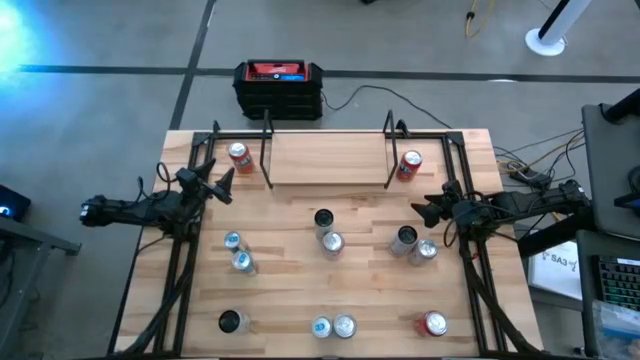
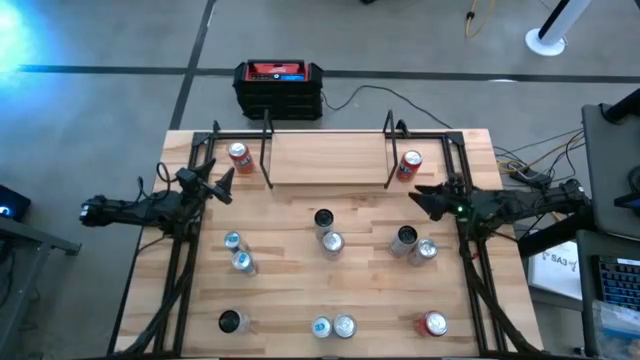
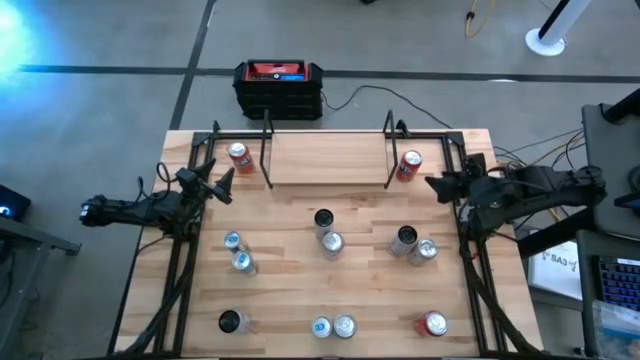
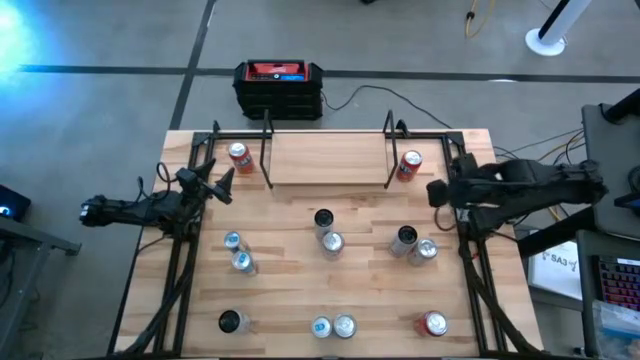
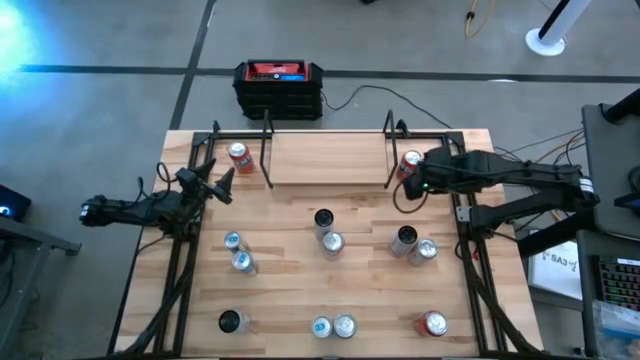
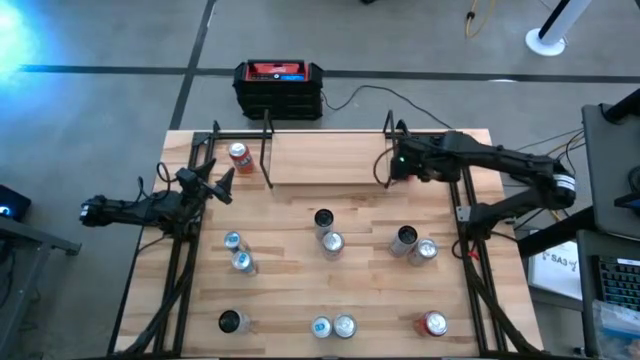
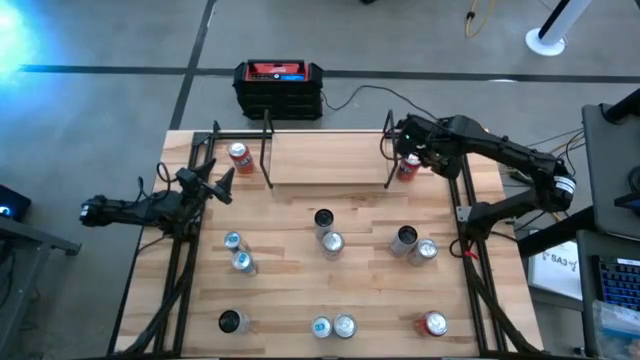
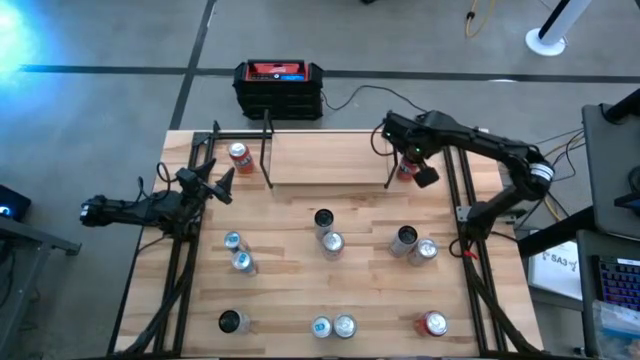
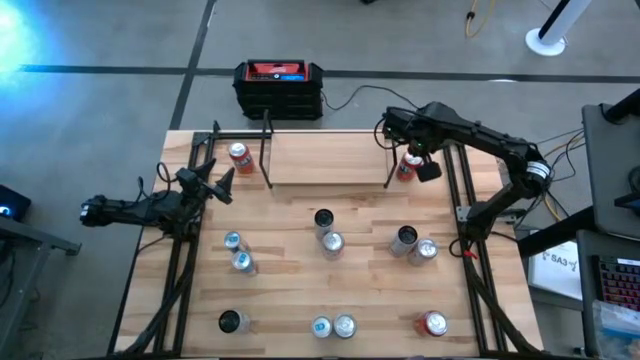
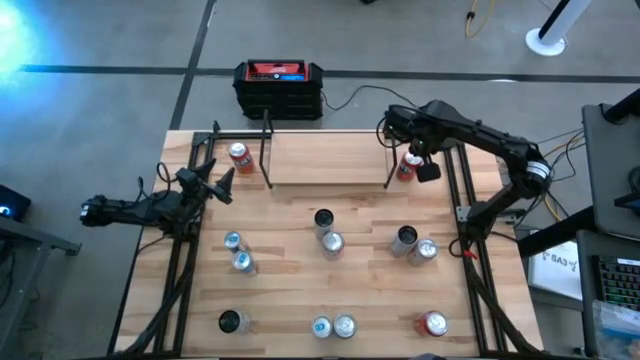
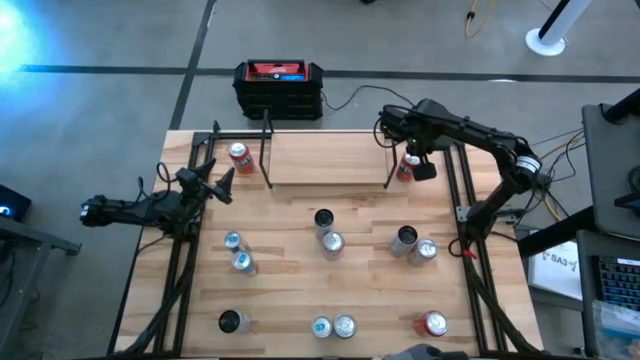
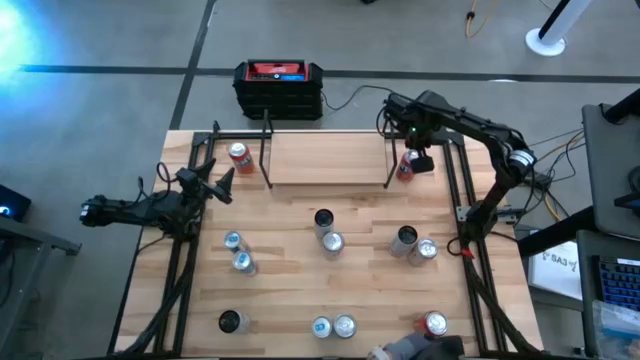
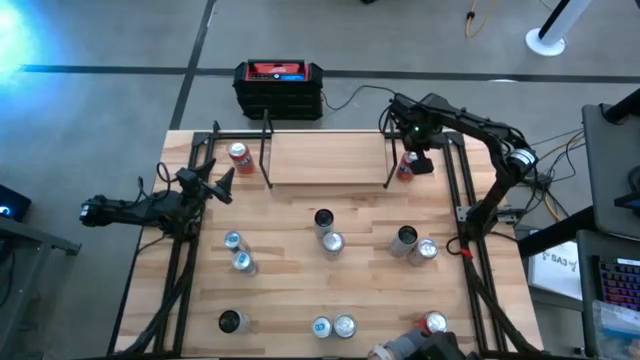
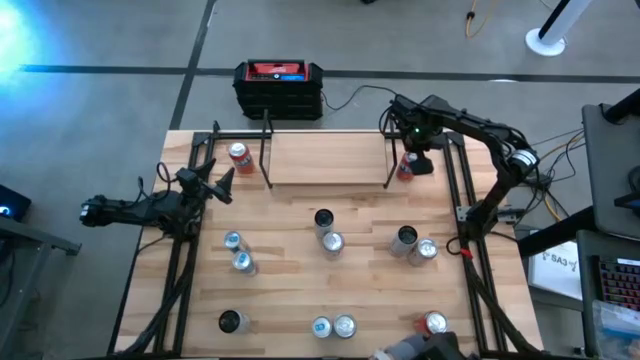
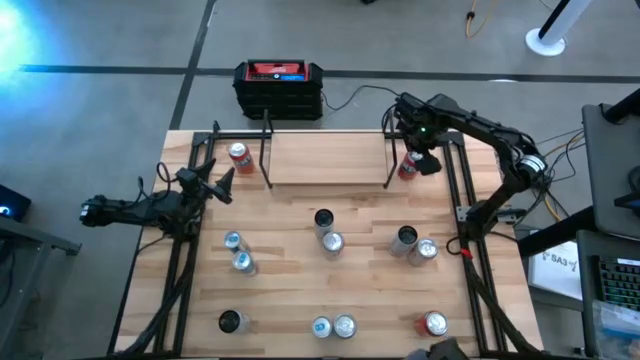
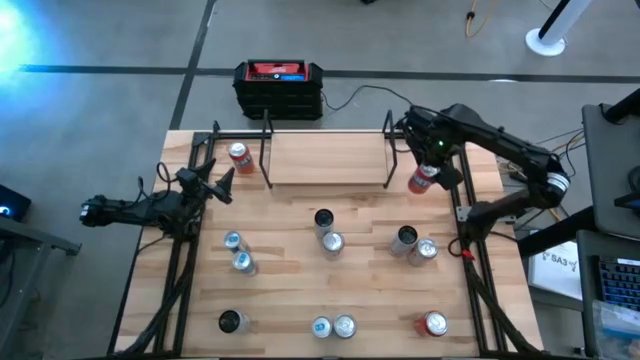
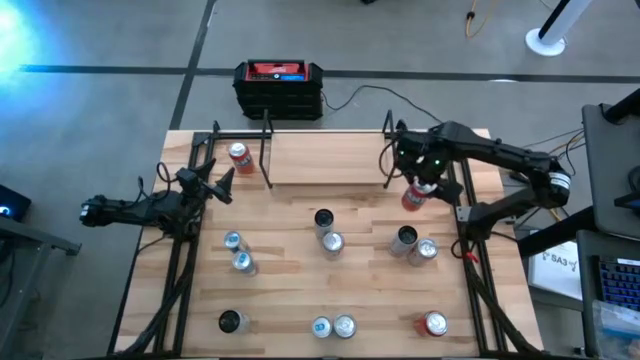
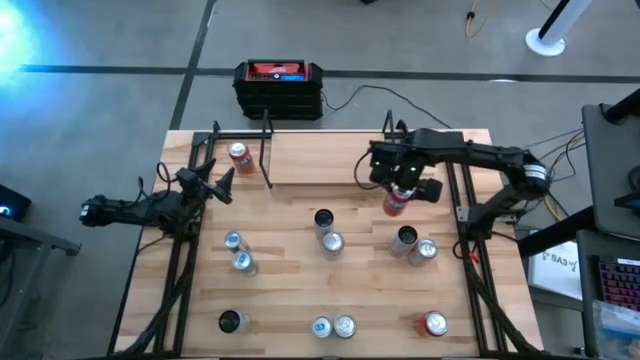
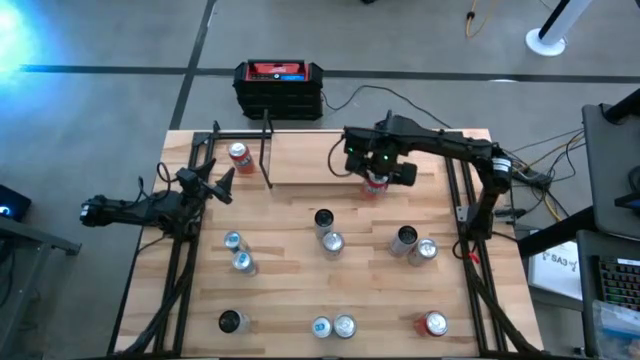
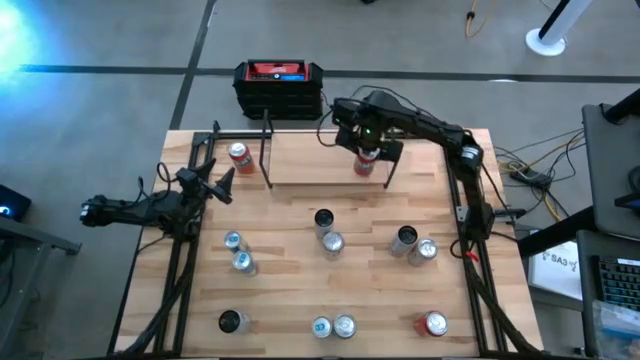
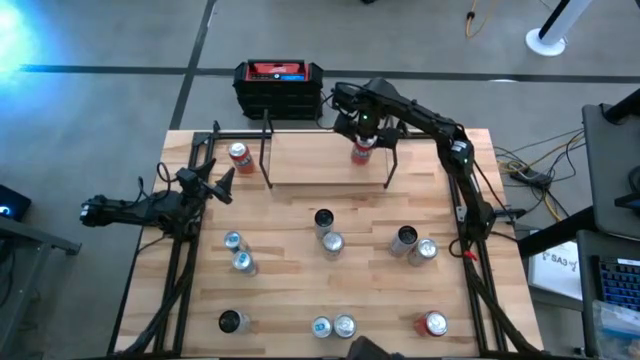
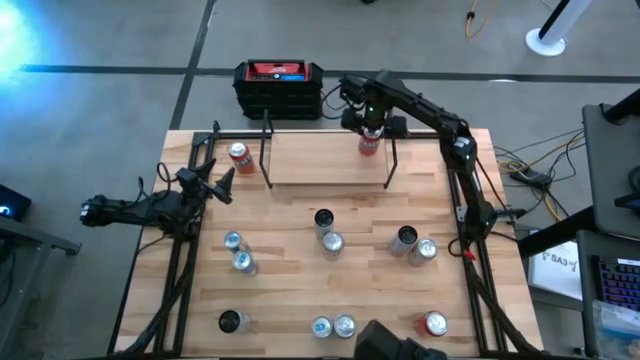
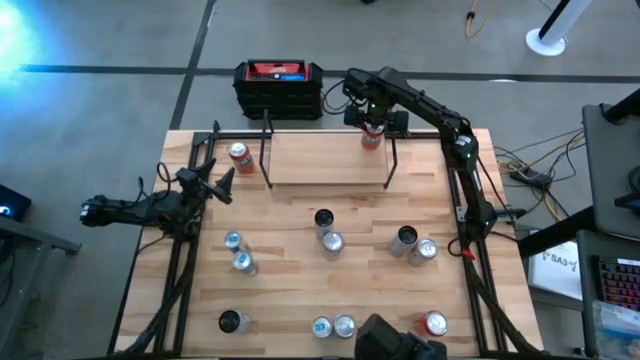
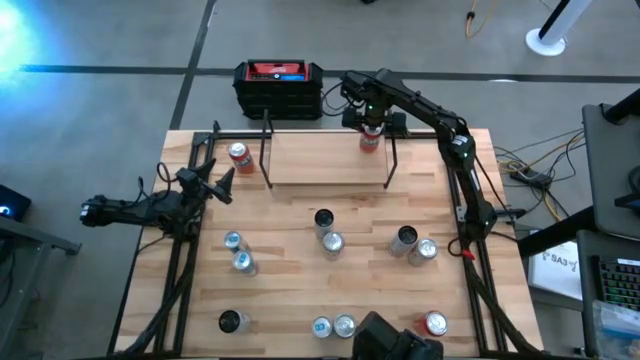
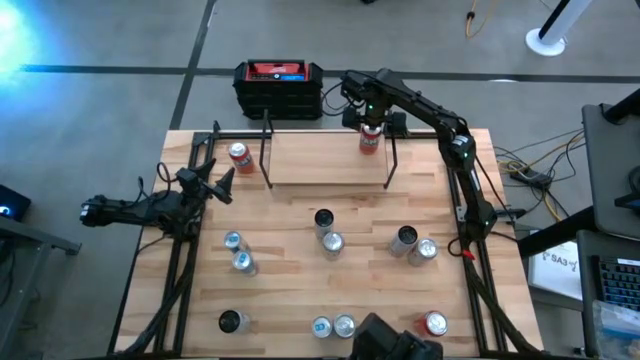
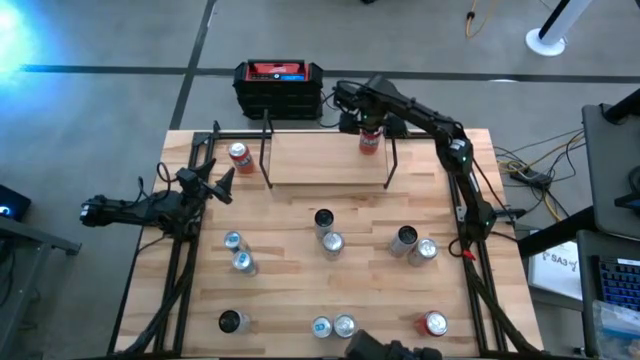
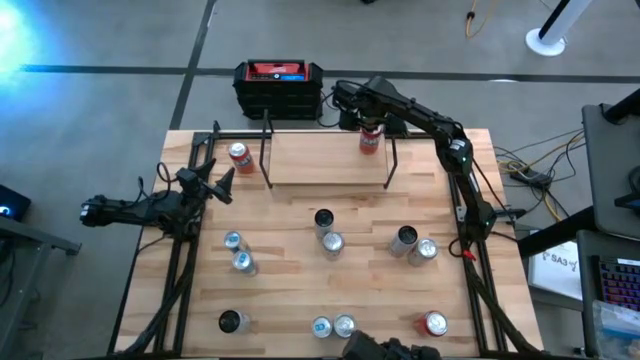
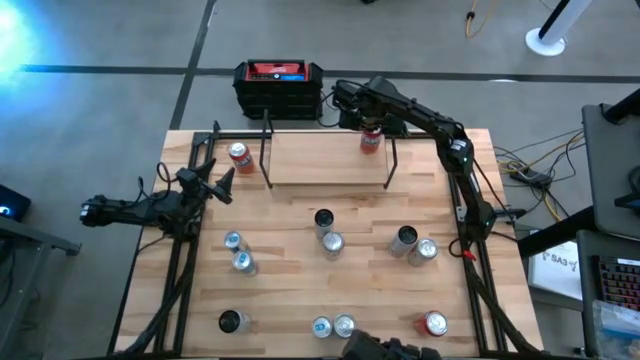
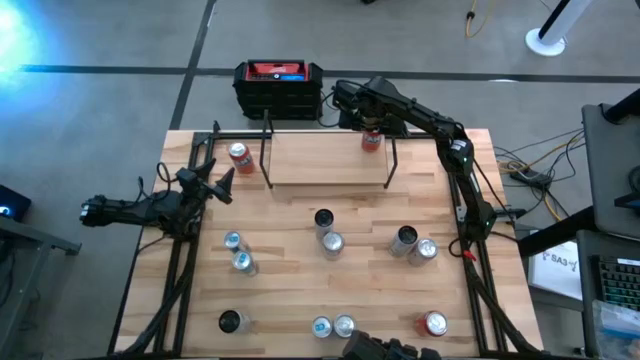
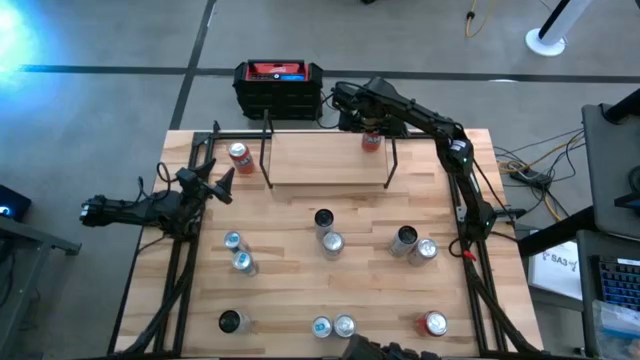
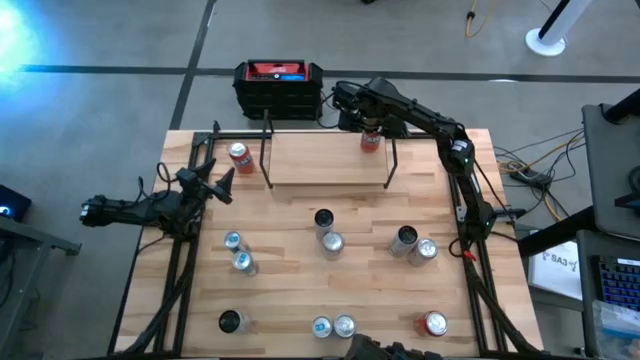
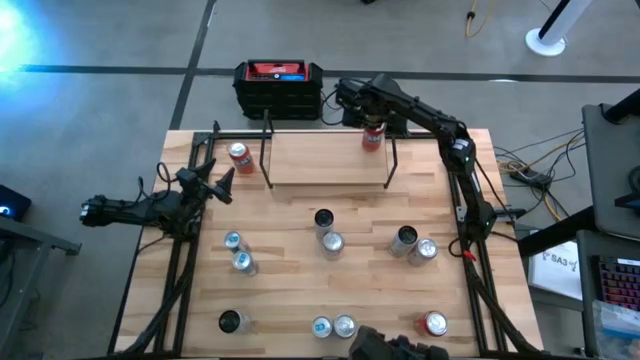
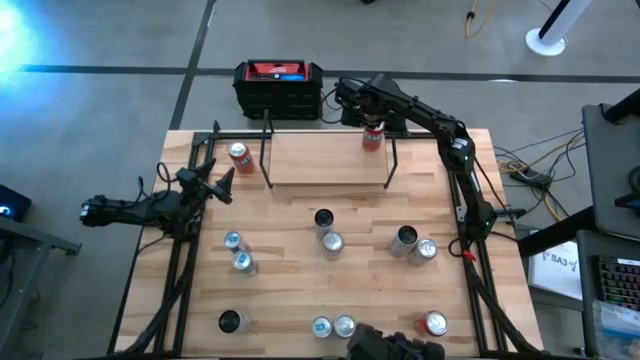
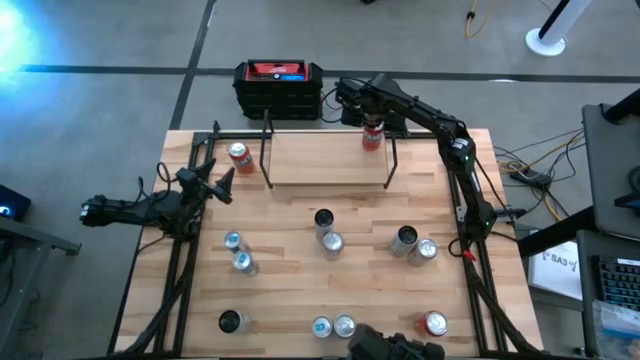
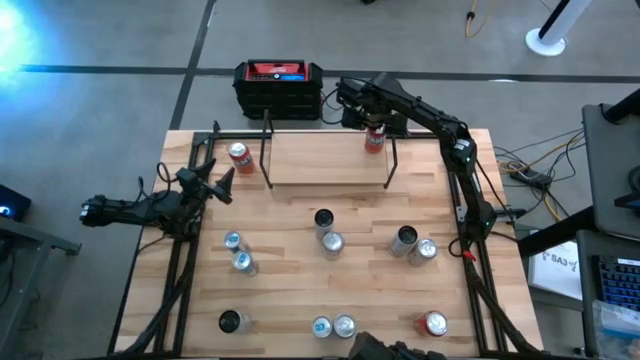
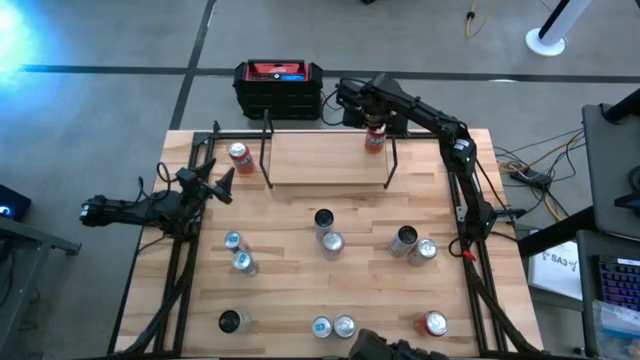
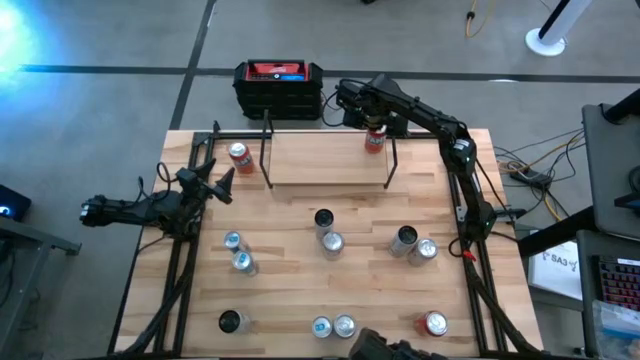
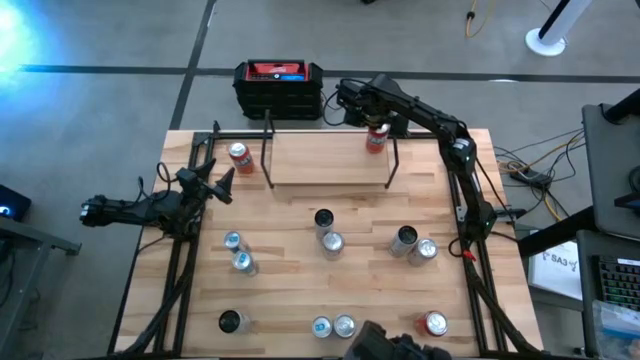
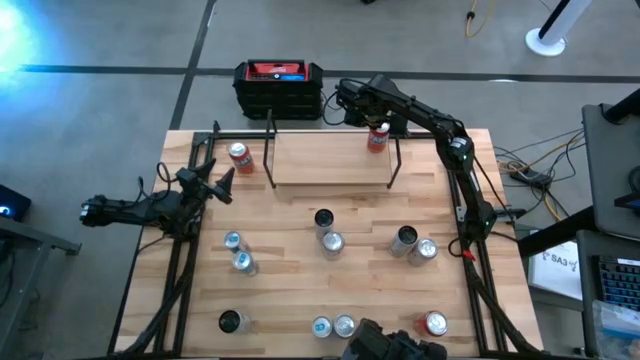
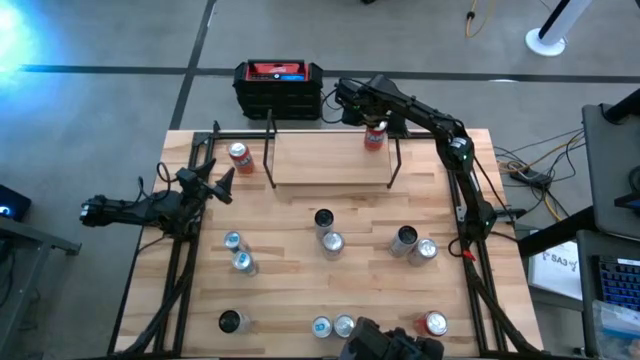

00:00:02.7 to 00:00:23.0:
Task: Place canned beverage on shelf
Put the top right red soda can on the shelf
